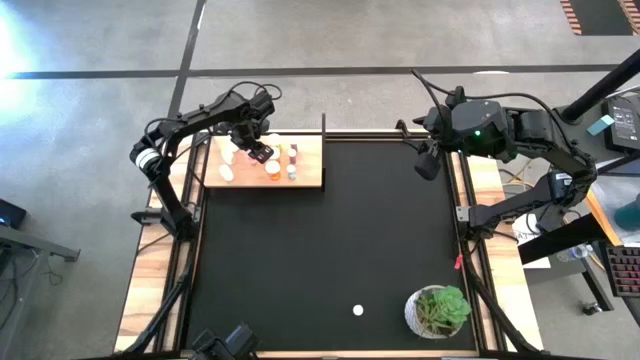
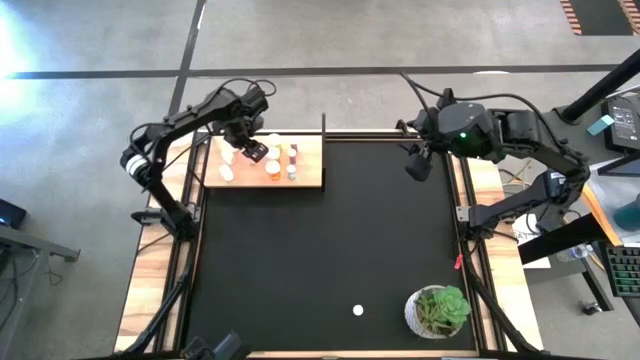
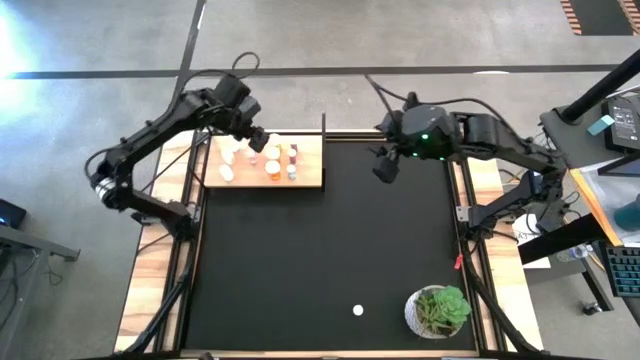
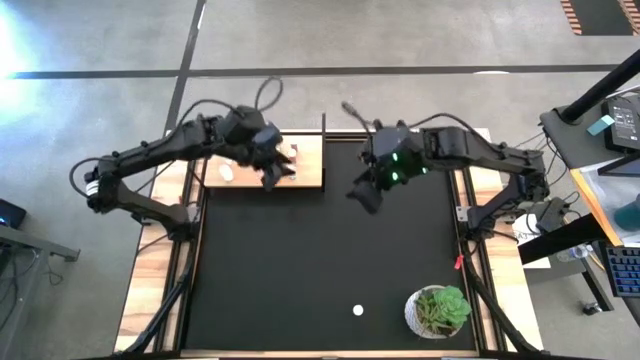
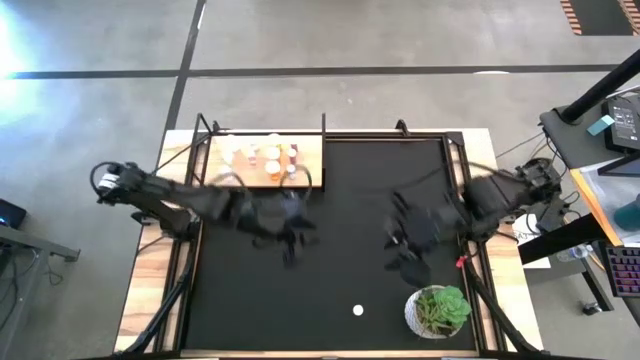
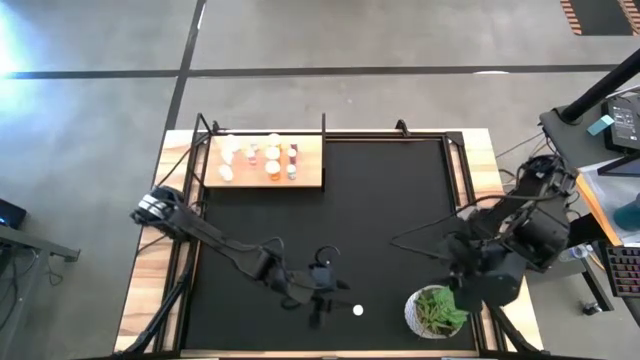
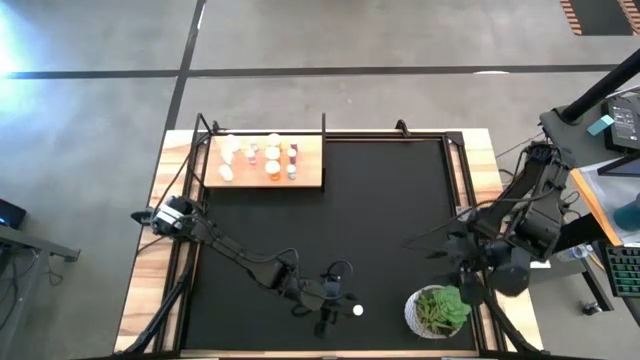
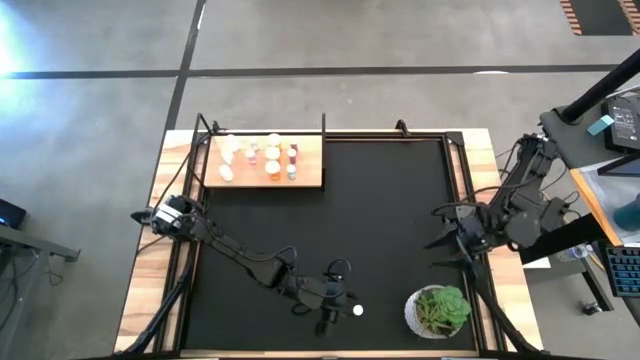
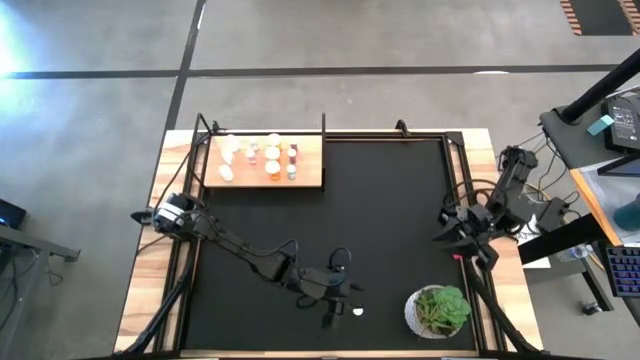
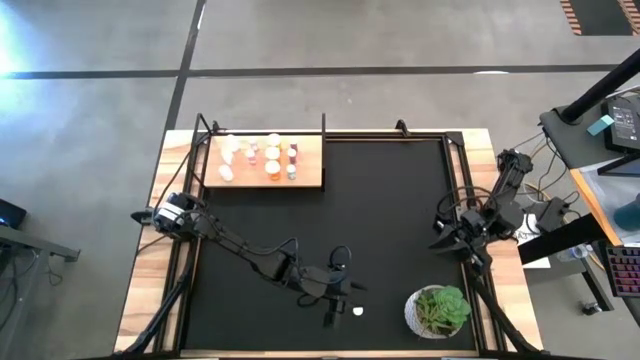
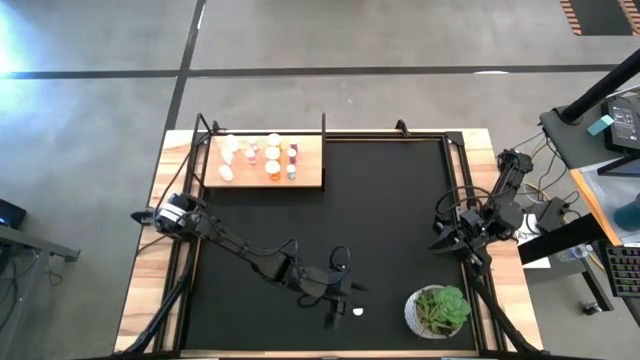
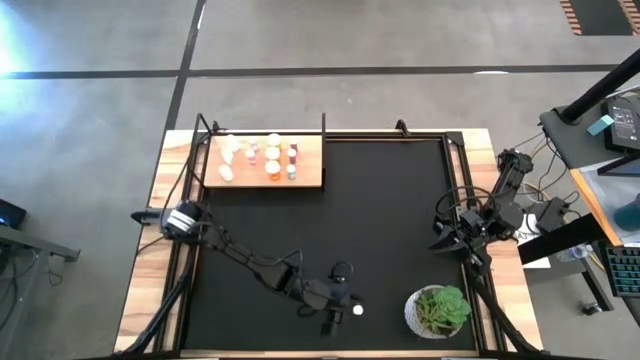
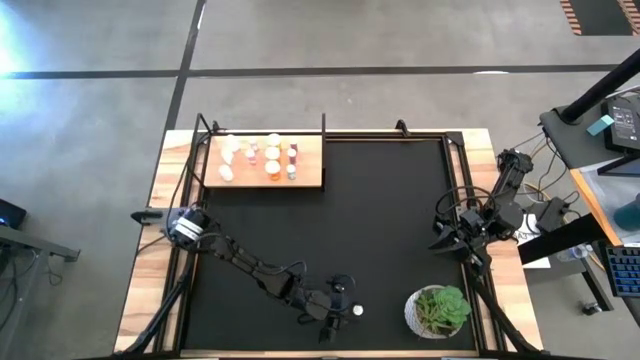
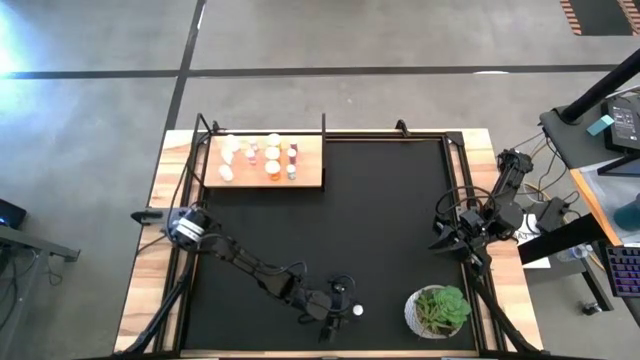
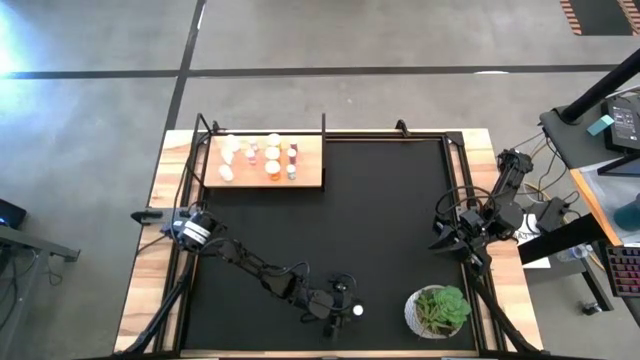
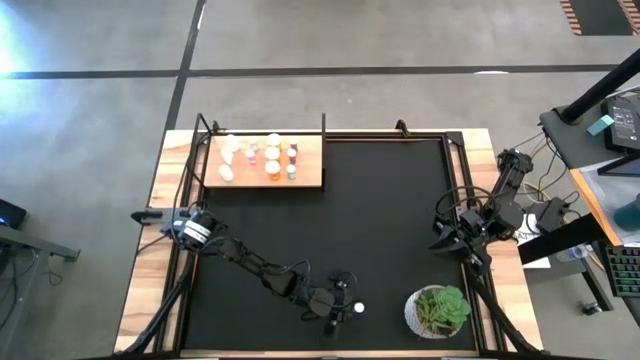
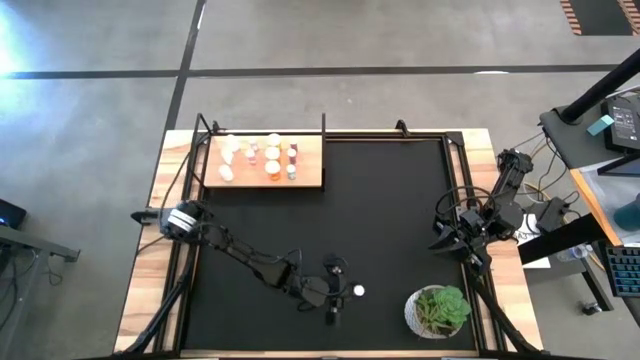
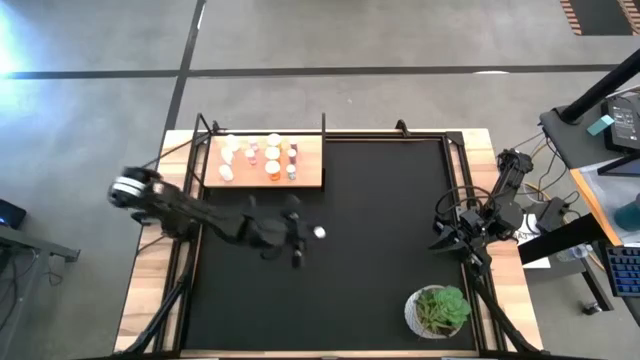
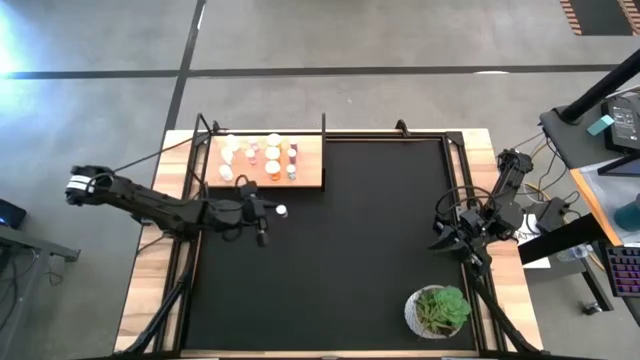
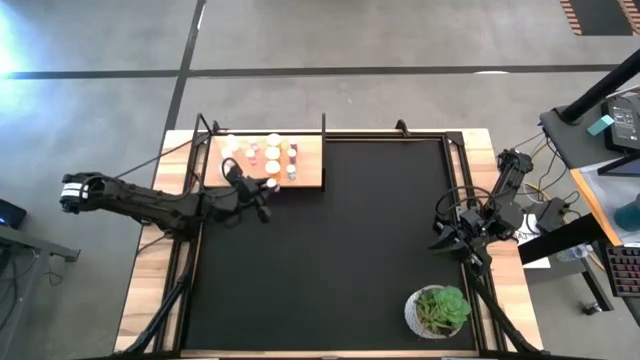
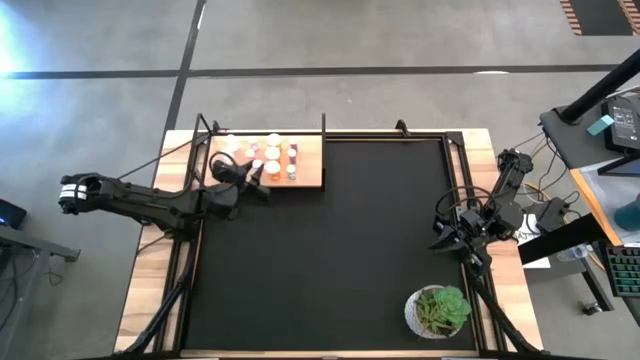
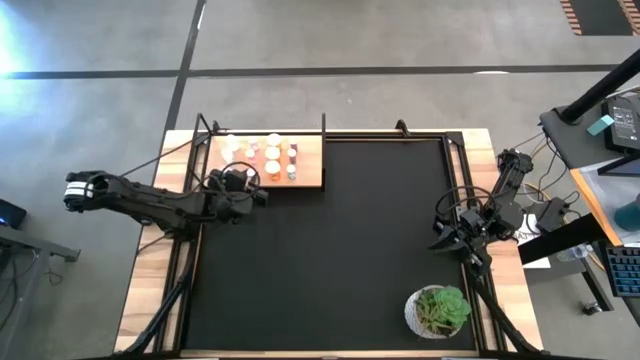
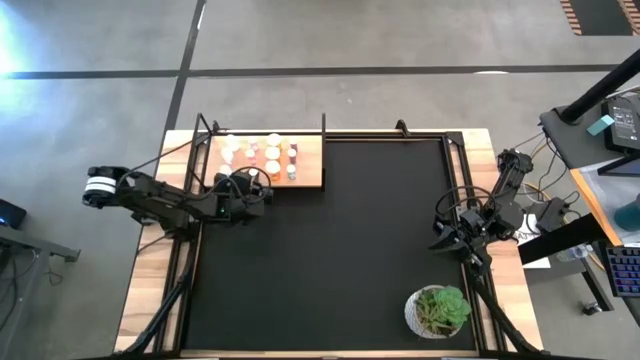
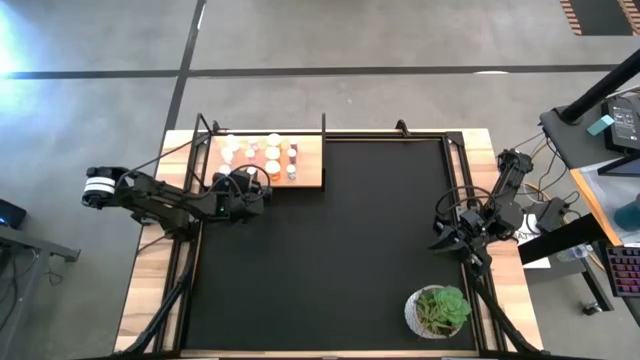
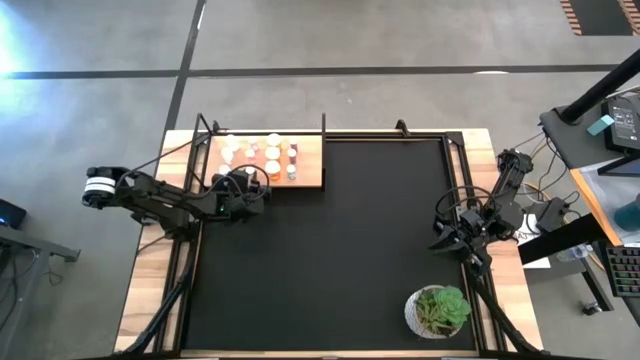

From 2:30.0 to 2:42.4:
Task: Pick and place medicine bottles onto shelf by color
Put the pink pill bottle on the shelf aligned with the other pink pill bottles

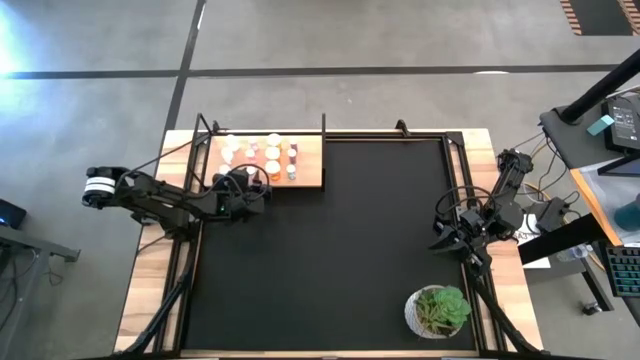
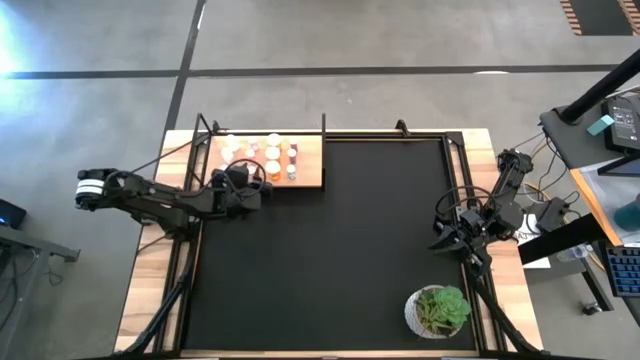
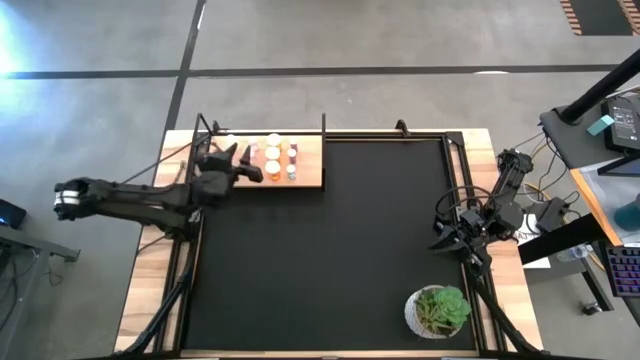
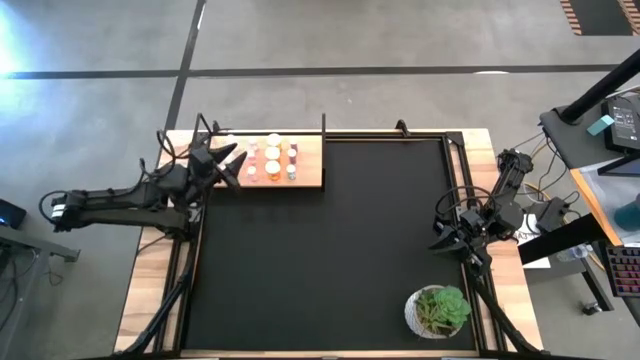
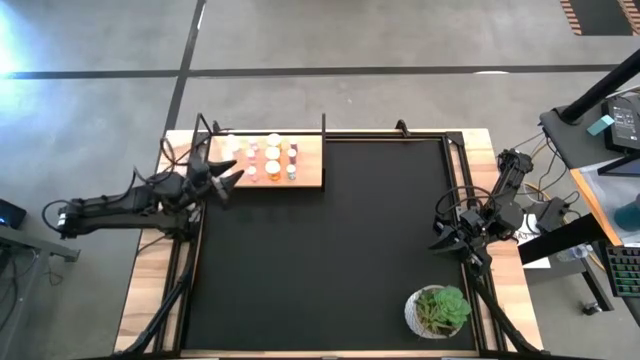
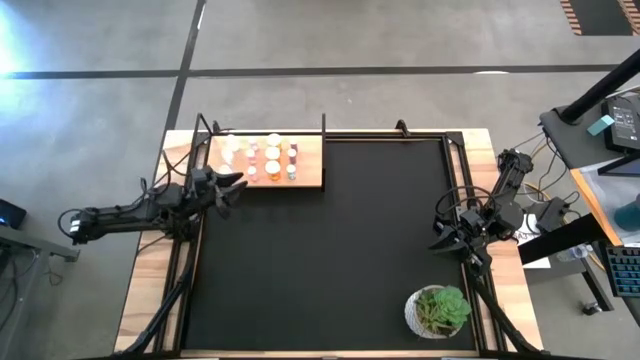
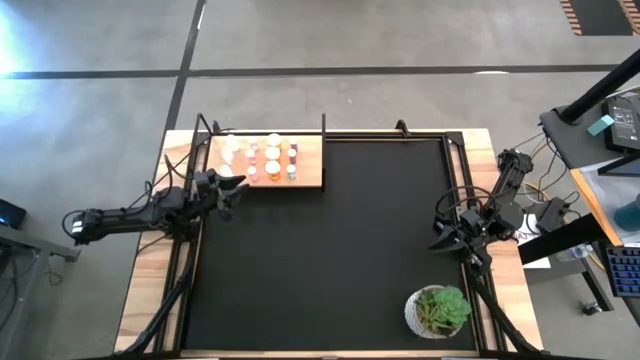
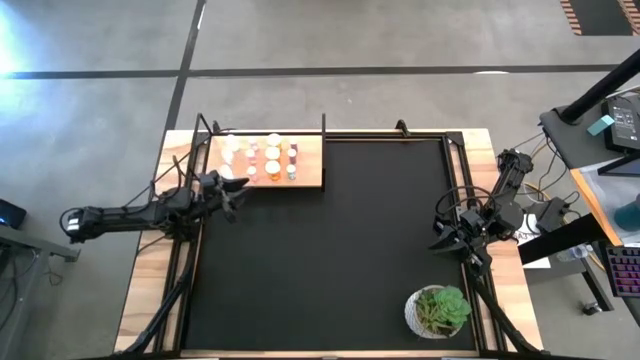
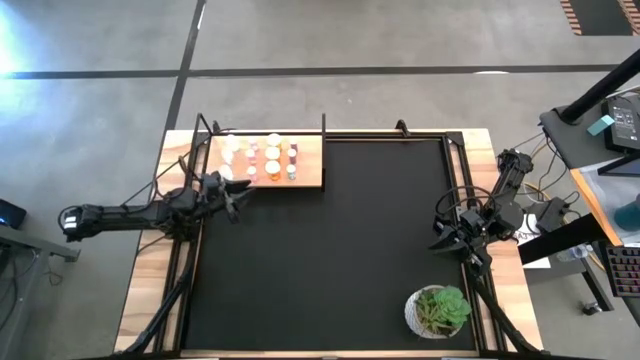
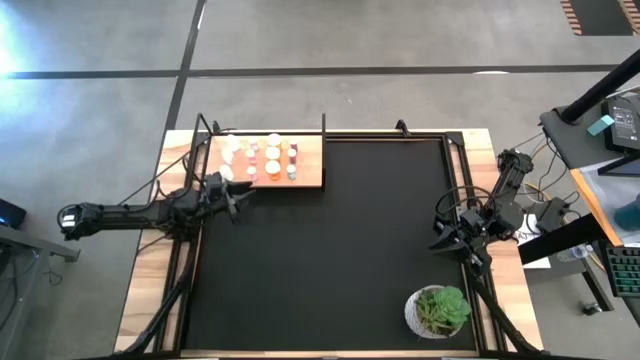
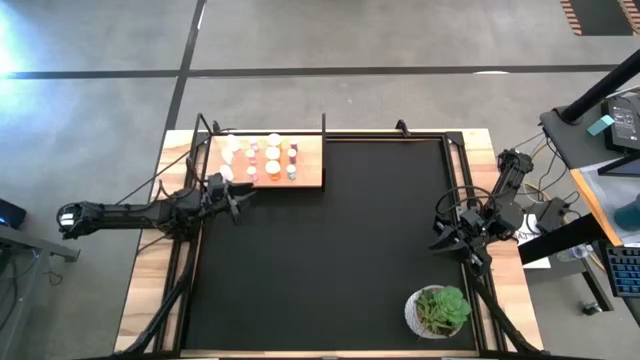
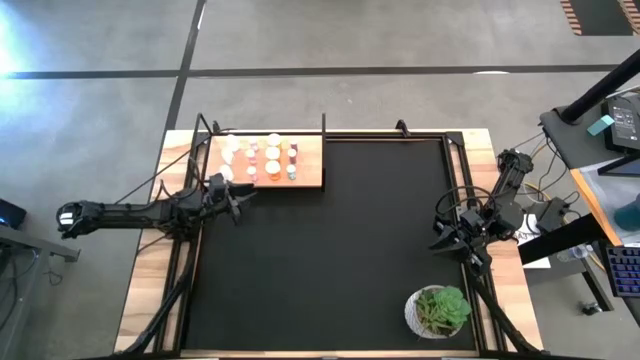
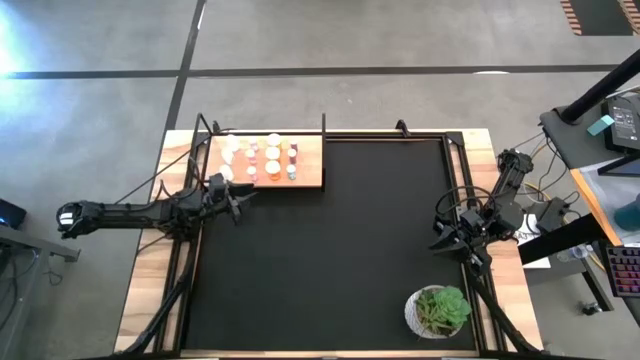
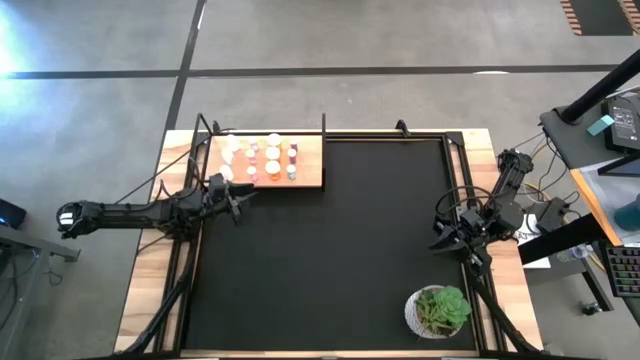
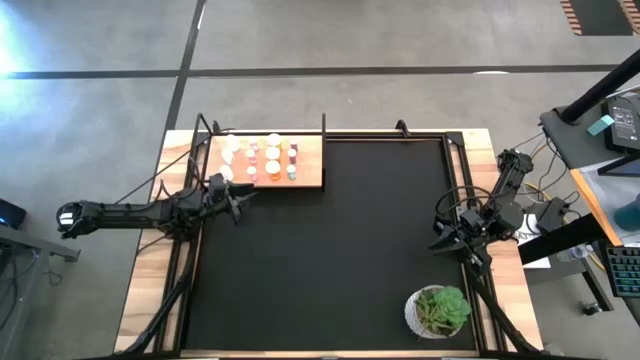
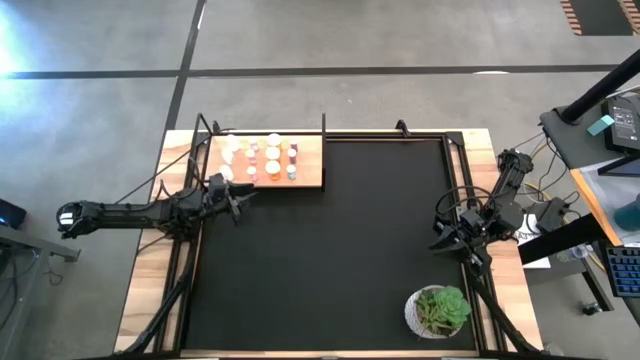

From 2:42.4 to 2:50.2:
Return to Home Position

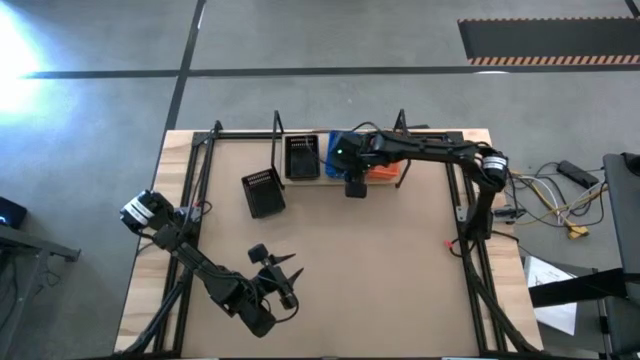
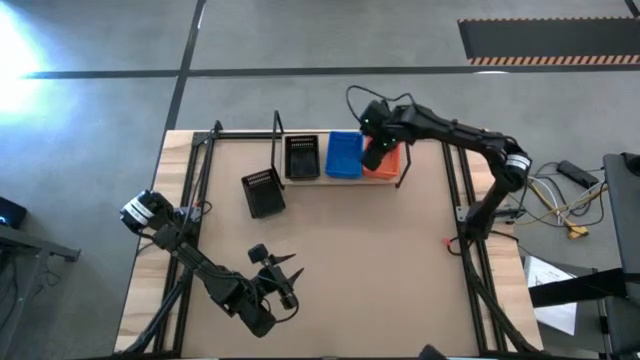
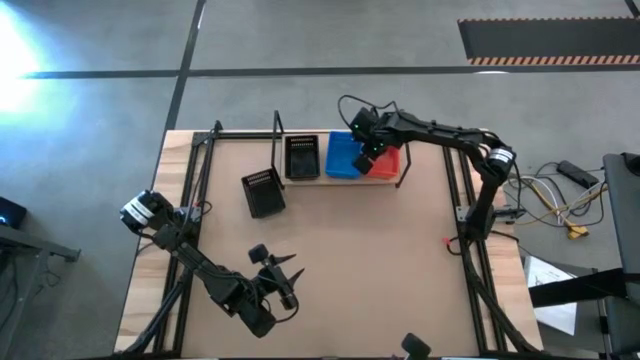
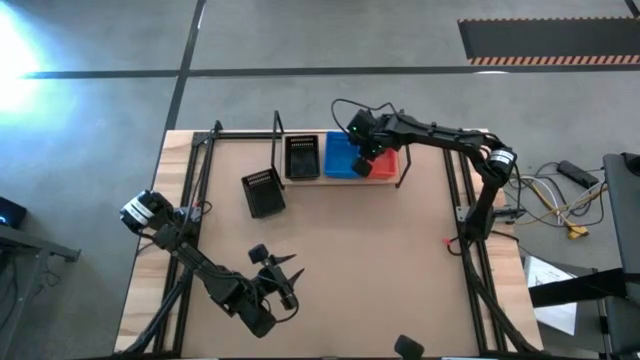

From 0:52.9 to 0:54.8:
Task: Stack baskets on shelf by color
Adjust the orange bin on the shelf
